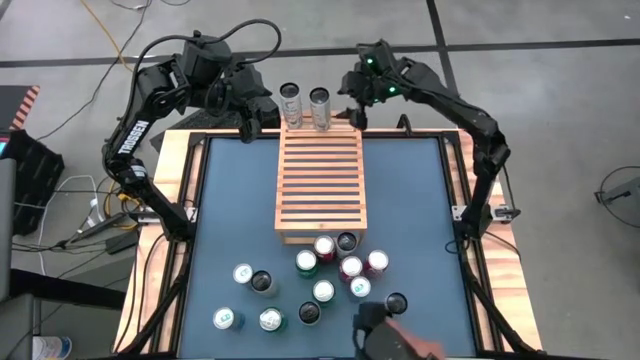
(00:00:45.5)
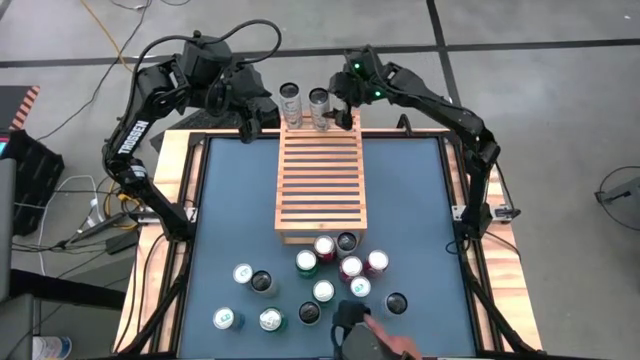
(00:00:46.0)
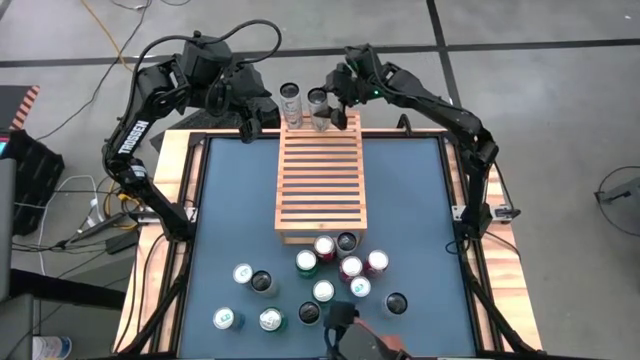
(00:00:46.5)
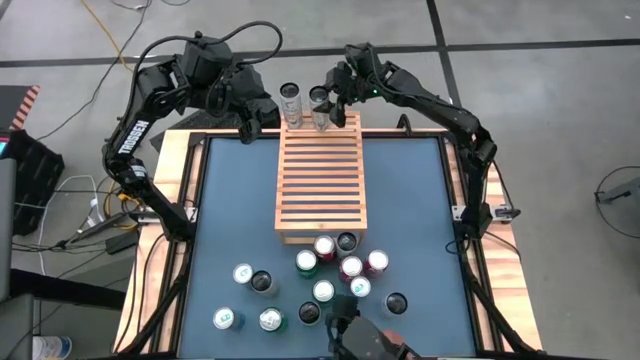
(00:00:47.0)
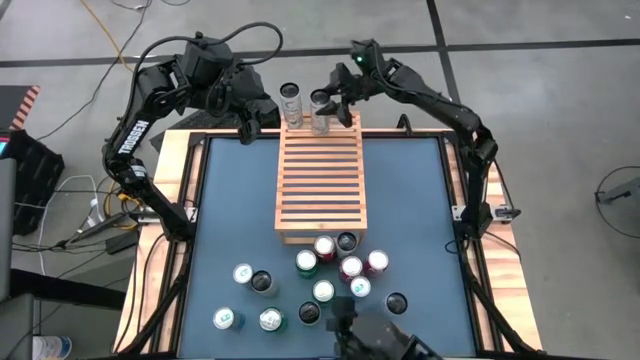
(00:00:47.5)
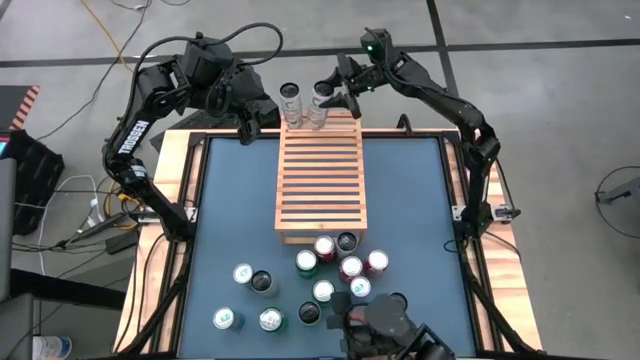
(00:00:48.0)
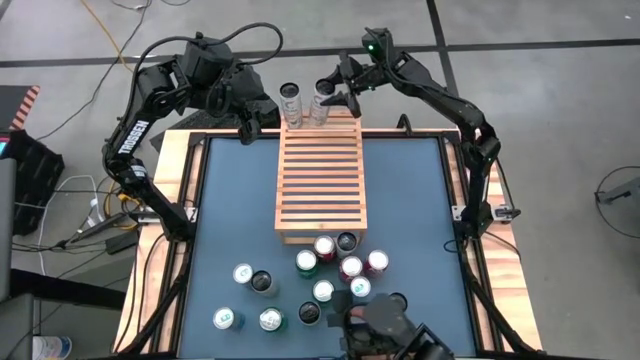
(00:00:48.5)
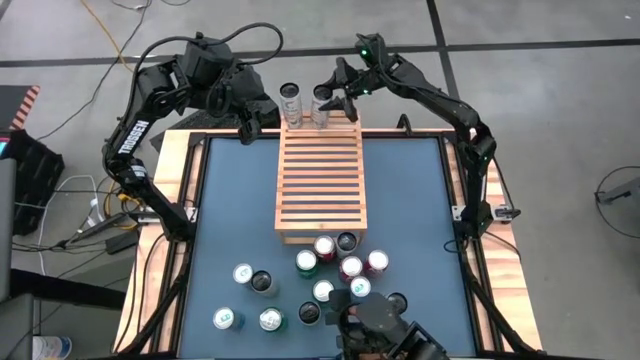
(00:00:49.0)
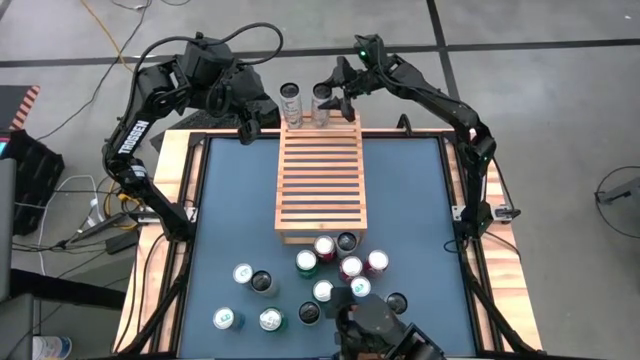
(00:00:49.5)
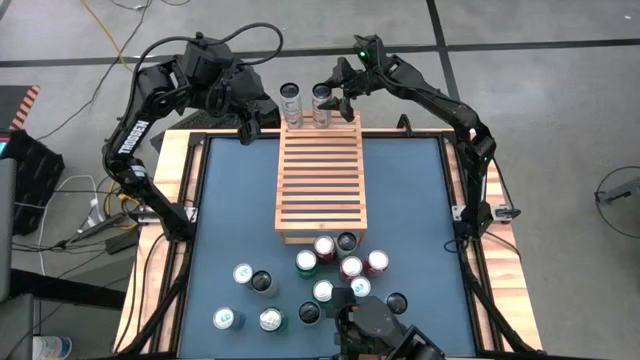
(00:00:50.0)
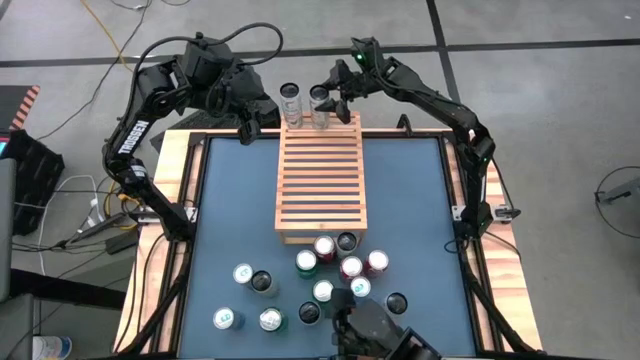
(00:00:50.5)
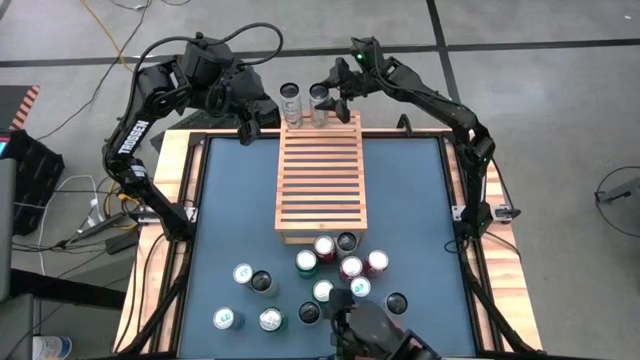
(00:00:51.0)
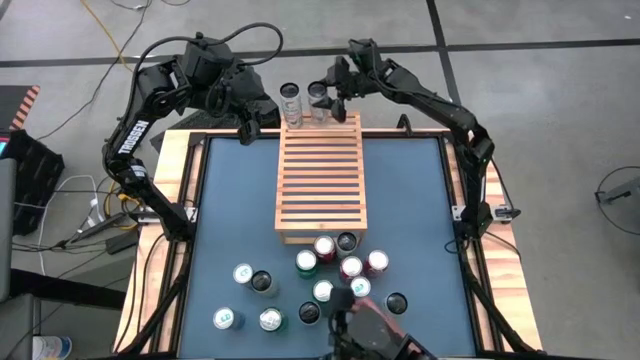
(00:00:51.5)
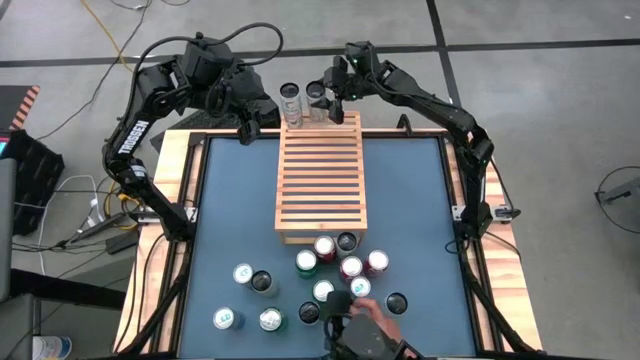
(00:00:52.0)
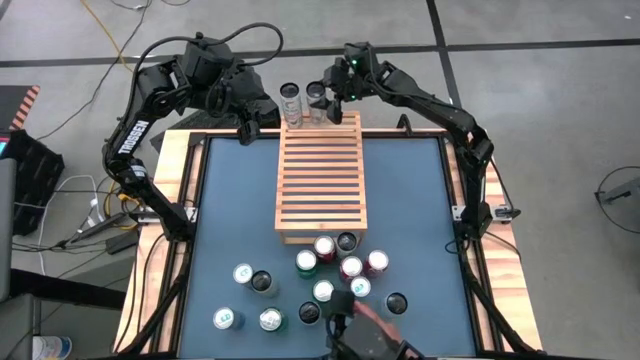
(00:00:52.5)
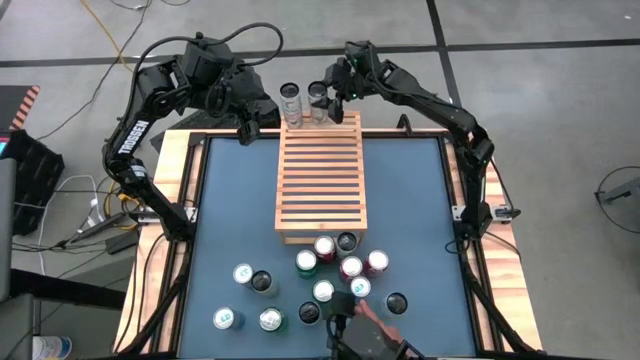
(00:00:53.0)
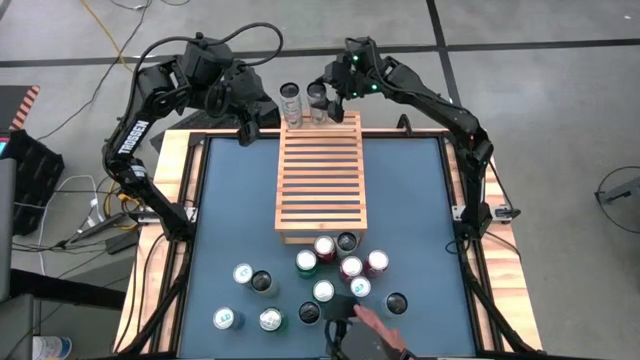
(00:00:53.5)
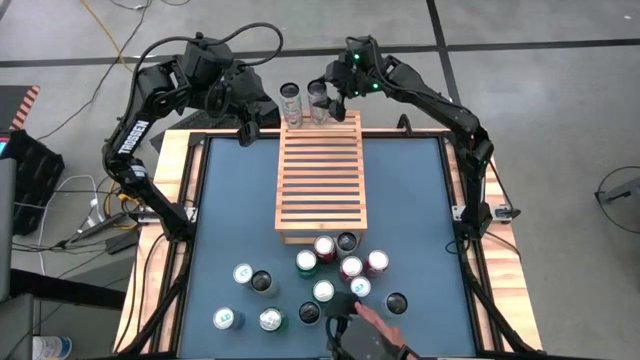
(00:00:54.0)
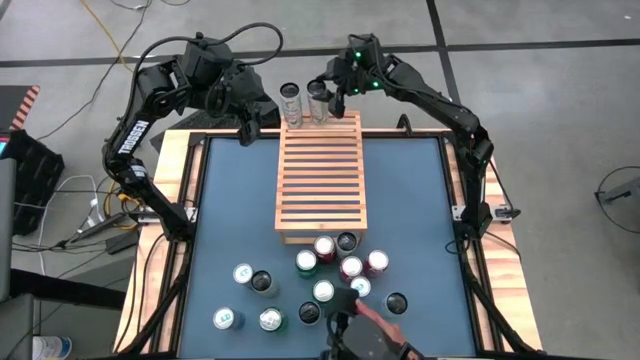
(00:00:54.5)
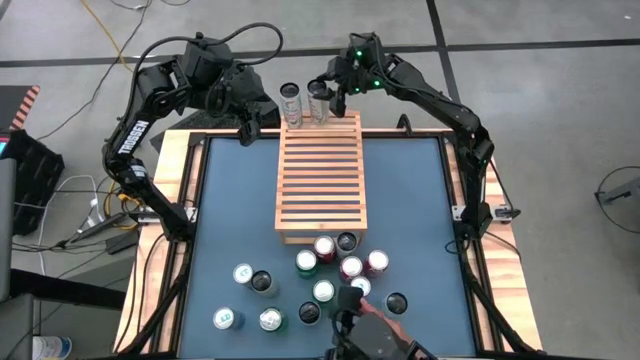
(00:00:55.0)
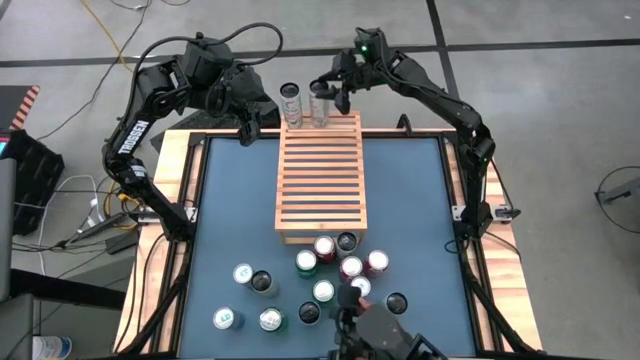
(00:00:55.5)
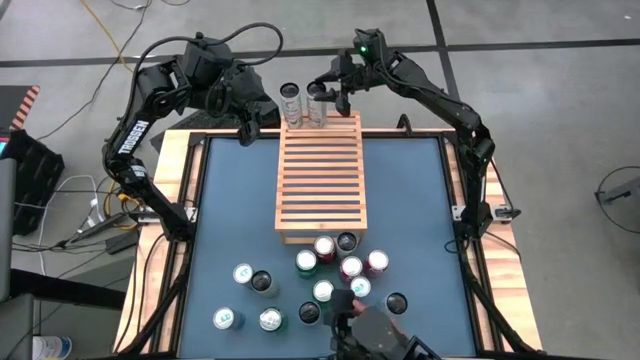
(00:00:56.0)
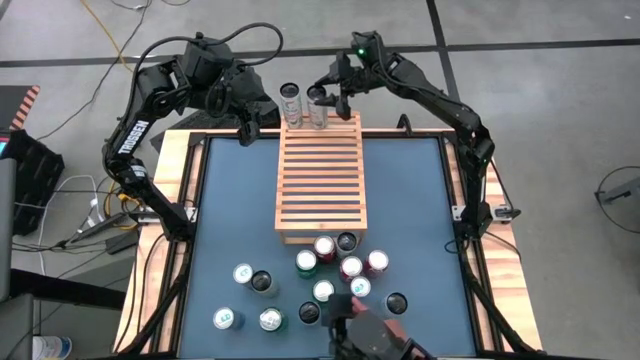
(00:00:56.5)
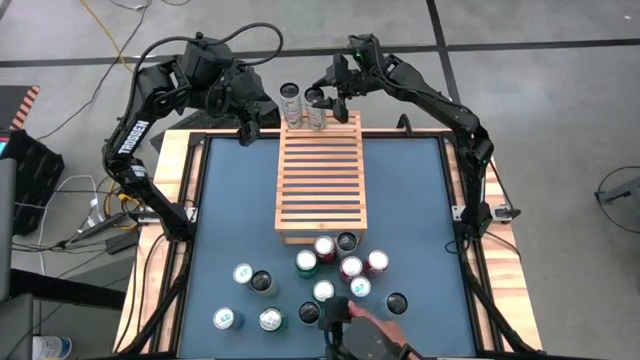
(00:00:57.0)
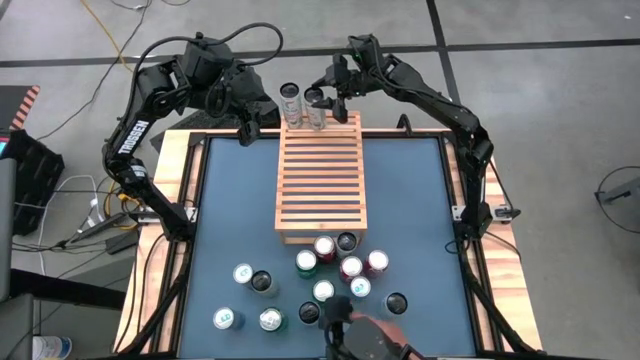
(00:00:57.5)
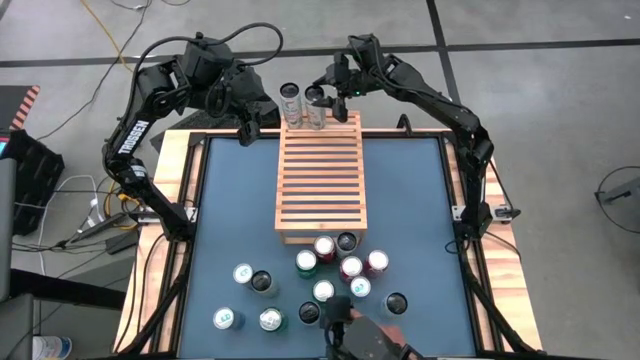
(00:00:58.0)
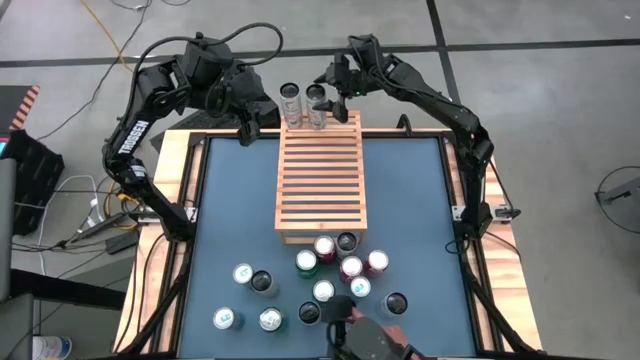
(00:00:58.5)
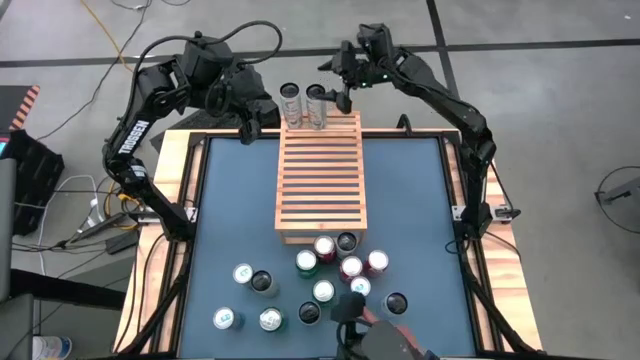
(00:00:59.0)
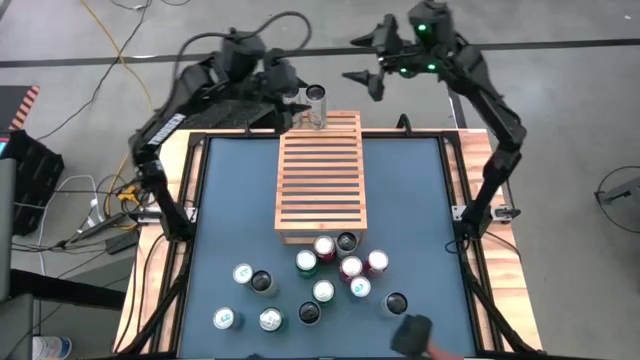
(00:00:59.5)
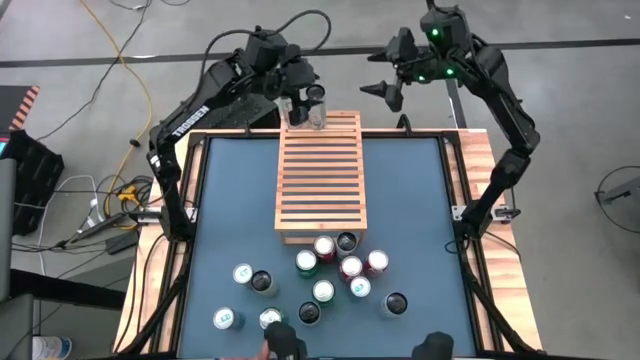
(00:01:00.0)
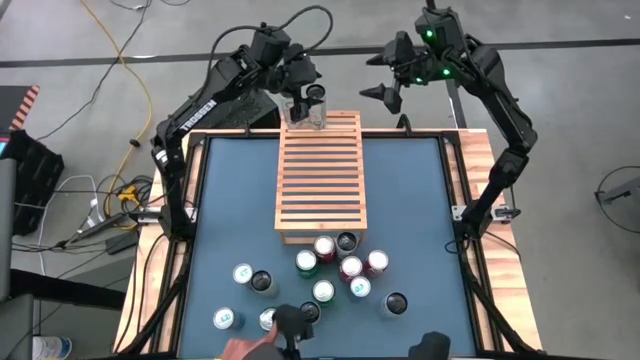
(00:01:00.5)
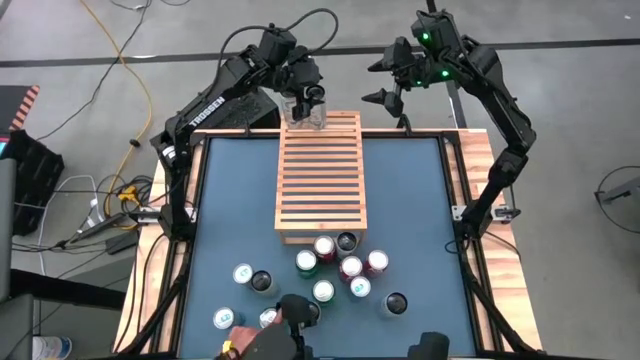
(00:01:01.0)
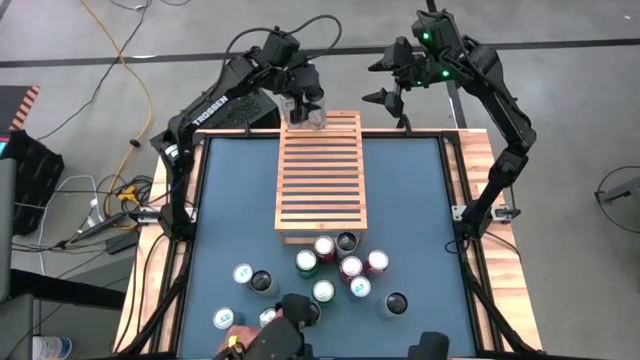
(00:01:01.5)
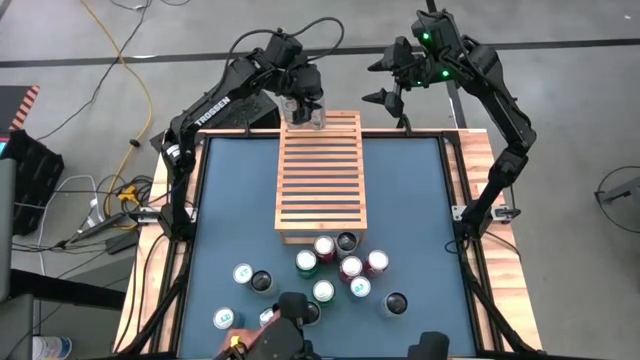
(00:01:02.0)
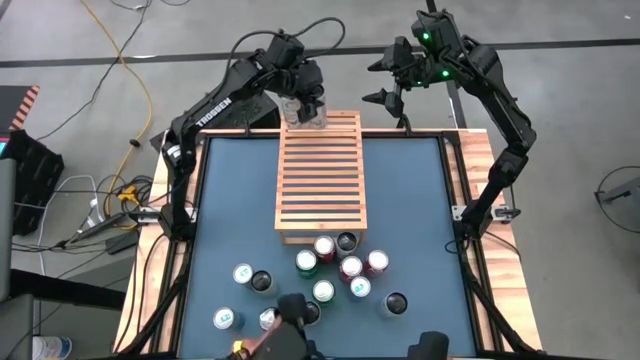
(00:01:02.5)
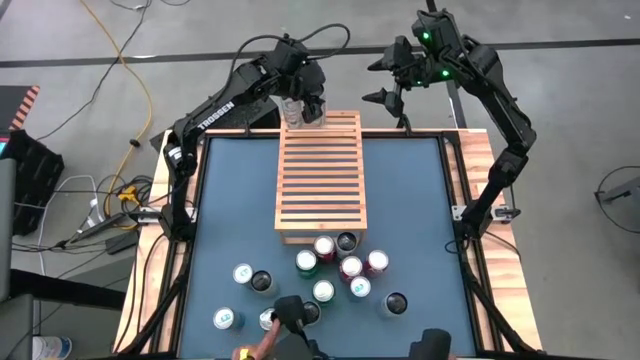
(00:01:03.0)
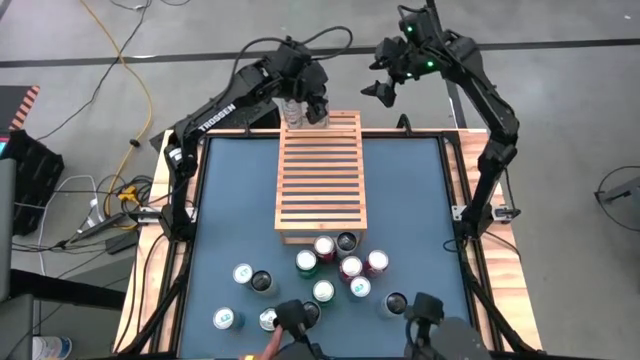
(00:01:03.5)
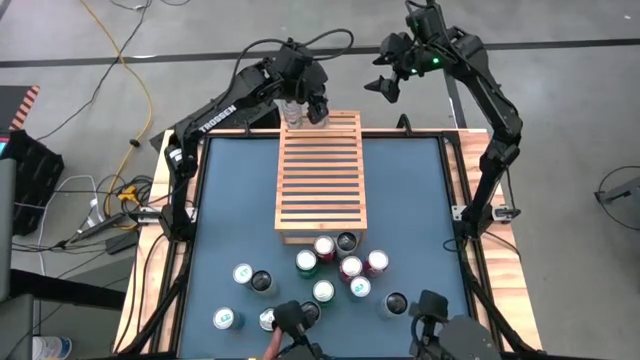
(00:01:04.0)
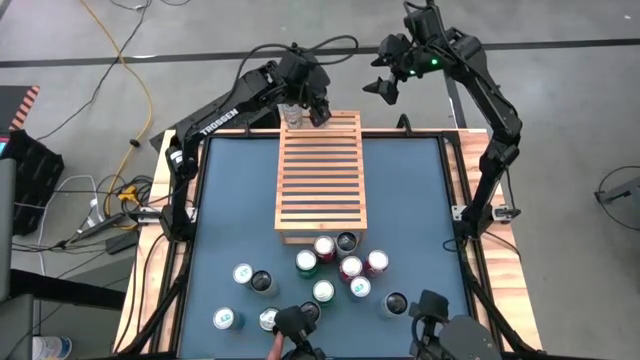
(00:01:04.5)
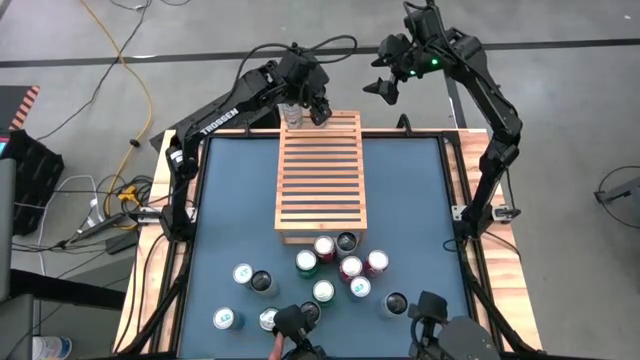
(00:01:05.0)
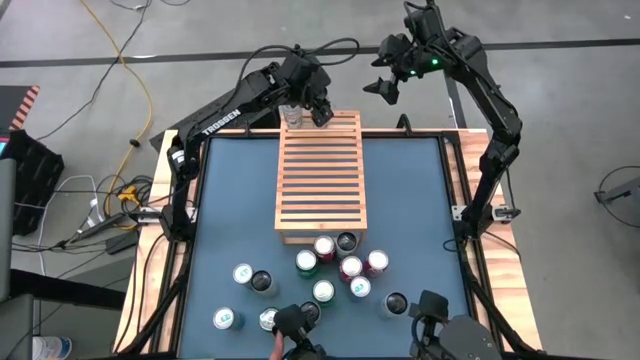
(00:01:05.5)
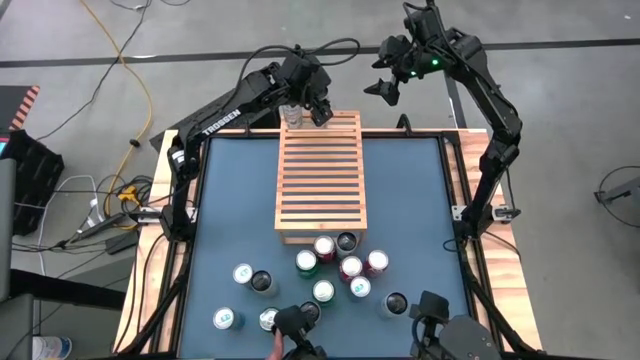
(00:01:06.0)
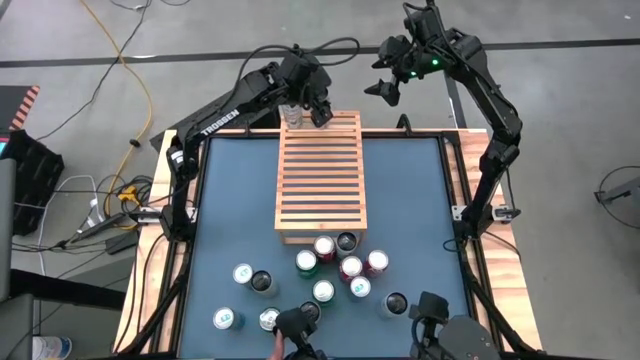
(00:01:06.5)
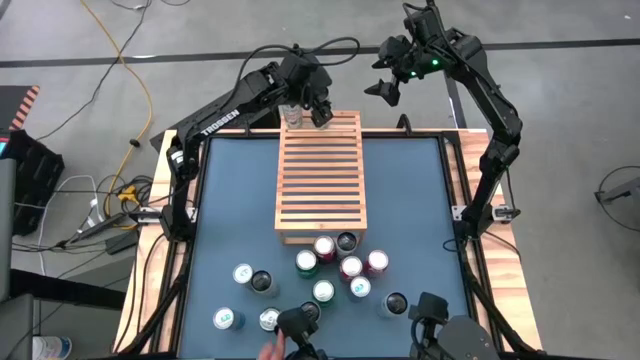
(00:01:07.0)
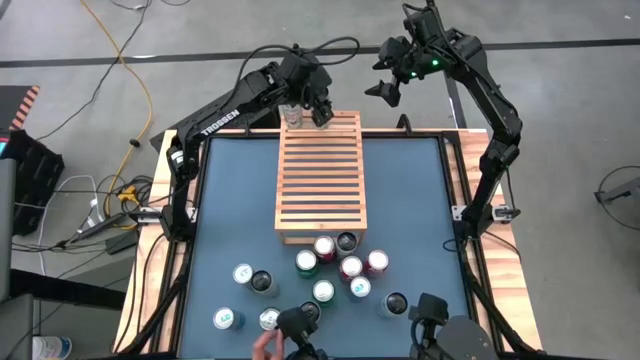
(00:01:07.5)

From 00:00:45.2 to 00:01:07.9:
Task: Place canned beverage on shelf
Put the right white yellow soda can on the shelf aligned with the other white yellow soda can
